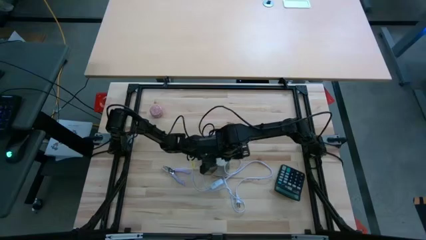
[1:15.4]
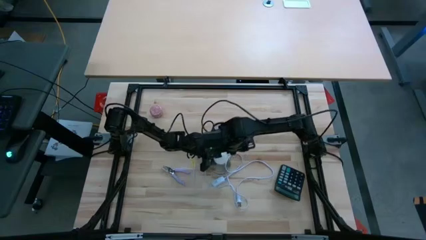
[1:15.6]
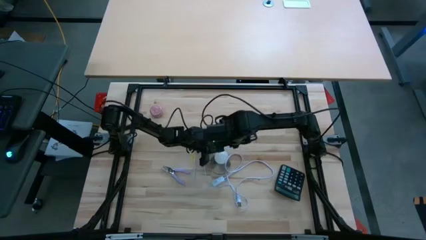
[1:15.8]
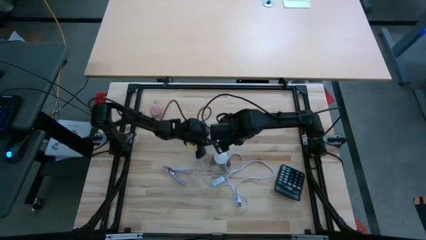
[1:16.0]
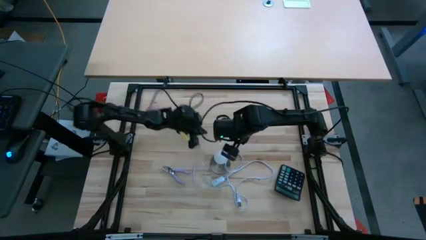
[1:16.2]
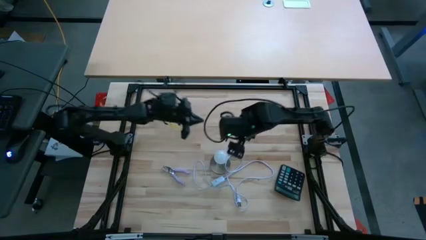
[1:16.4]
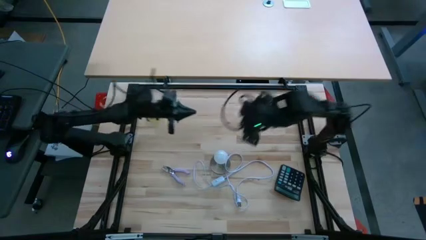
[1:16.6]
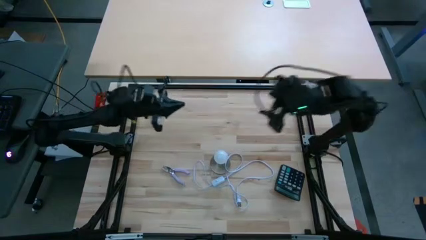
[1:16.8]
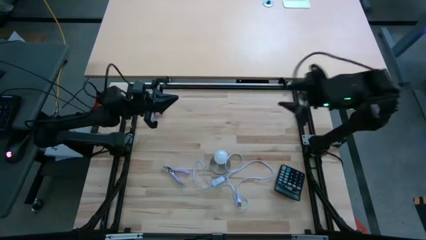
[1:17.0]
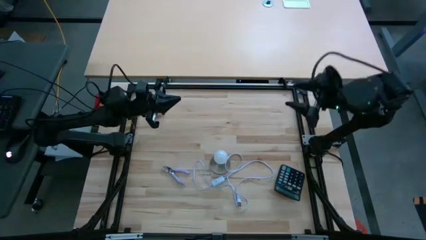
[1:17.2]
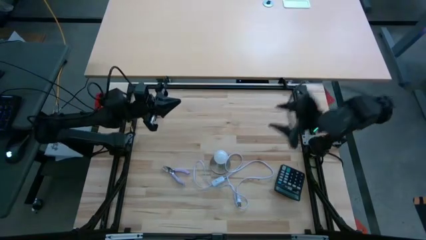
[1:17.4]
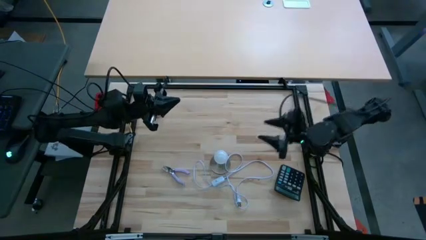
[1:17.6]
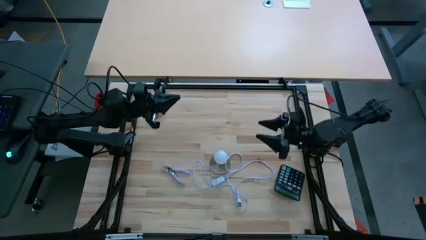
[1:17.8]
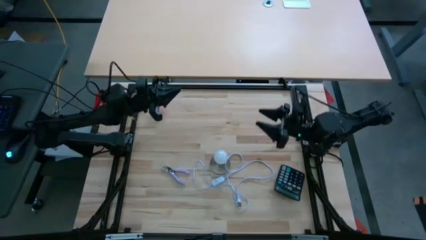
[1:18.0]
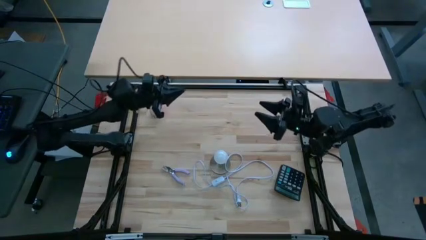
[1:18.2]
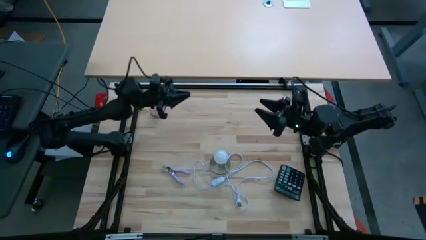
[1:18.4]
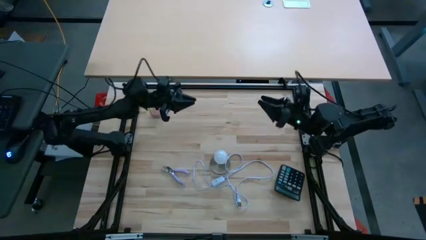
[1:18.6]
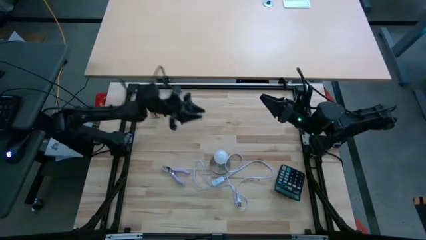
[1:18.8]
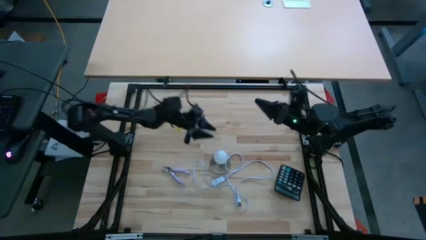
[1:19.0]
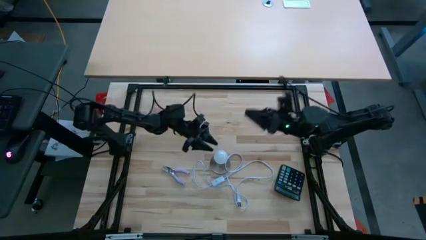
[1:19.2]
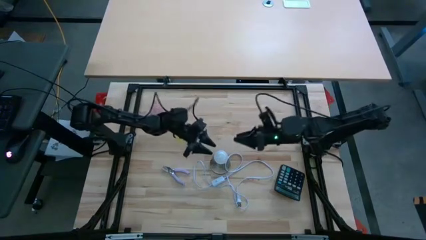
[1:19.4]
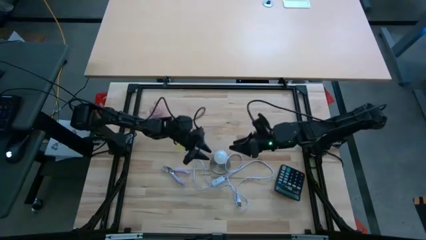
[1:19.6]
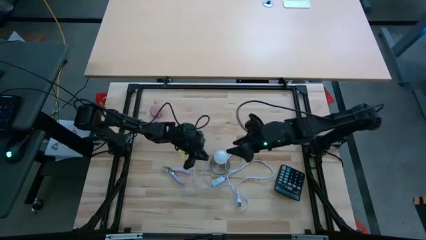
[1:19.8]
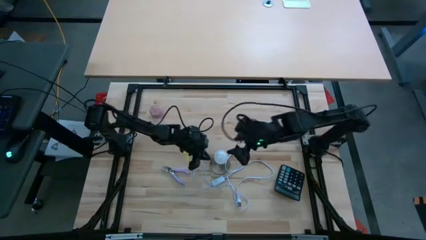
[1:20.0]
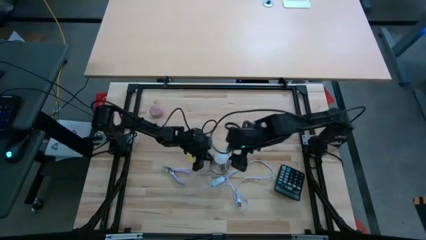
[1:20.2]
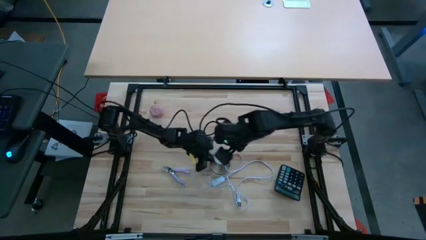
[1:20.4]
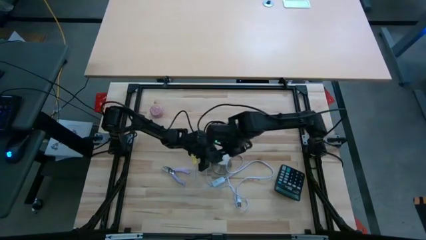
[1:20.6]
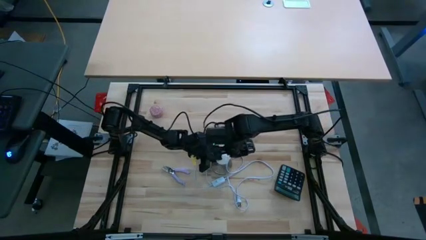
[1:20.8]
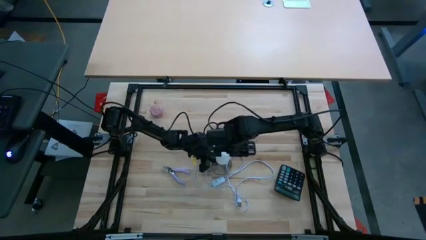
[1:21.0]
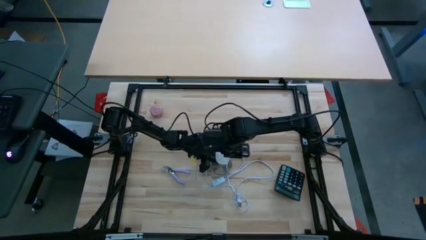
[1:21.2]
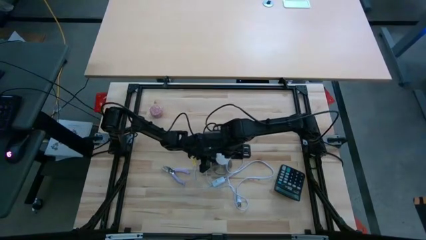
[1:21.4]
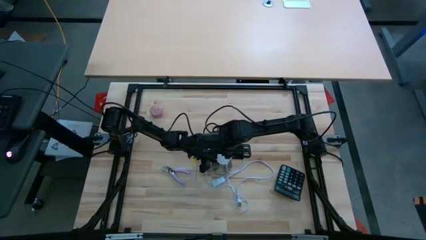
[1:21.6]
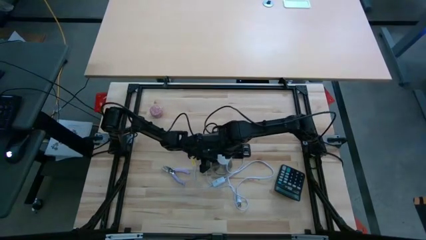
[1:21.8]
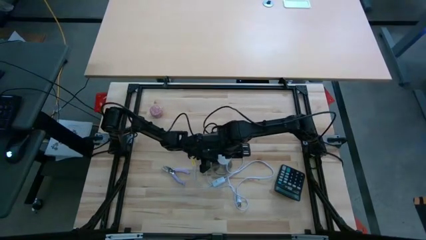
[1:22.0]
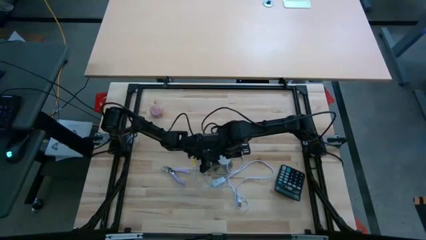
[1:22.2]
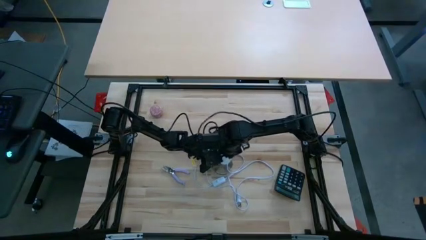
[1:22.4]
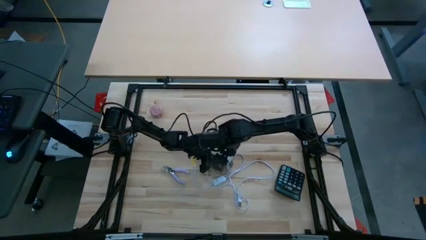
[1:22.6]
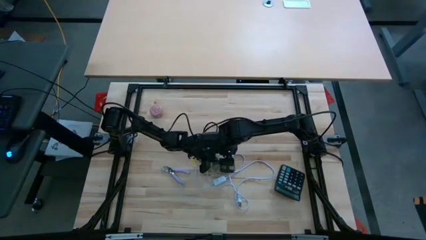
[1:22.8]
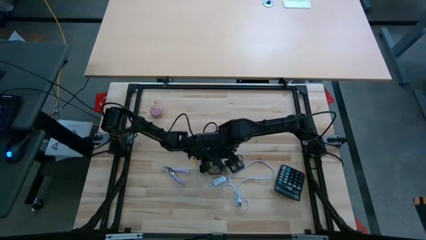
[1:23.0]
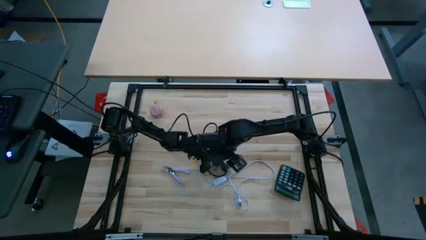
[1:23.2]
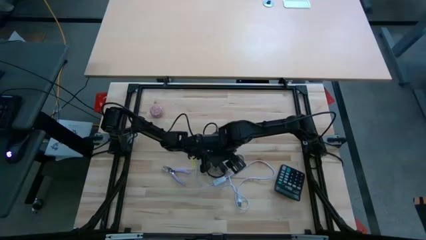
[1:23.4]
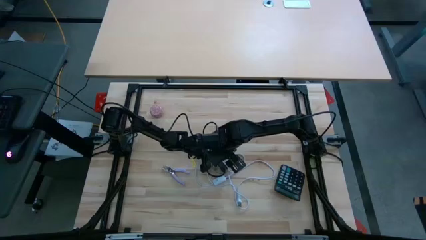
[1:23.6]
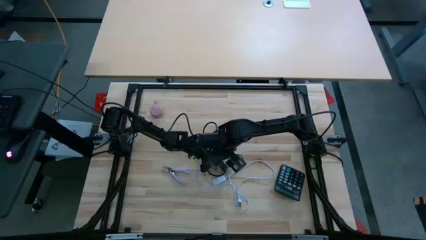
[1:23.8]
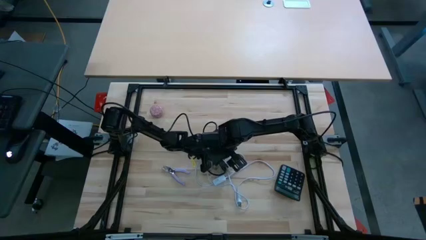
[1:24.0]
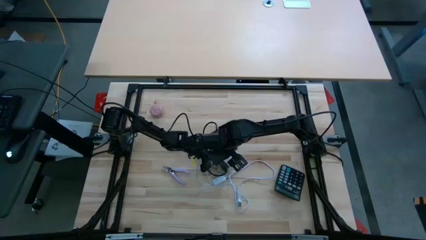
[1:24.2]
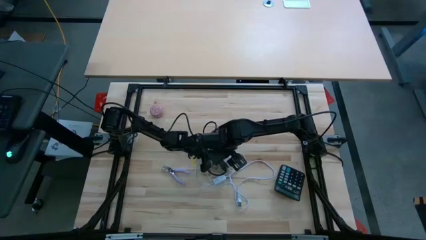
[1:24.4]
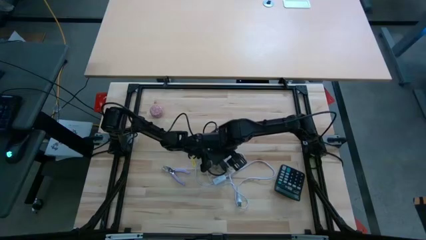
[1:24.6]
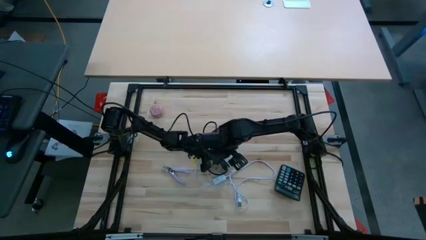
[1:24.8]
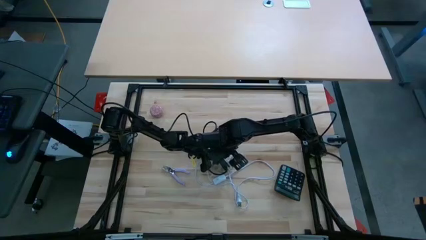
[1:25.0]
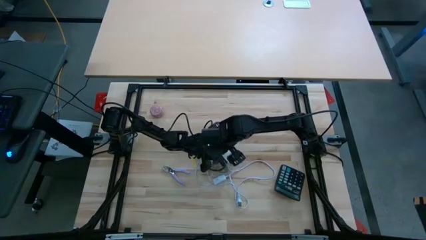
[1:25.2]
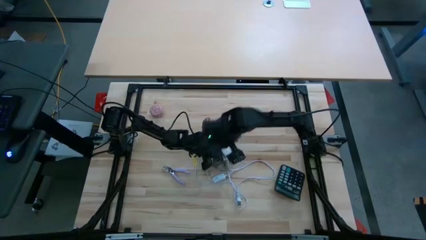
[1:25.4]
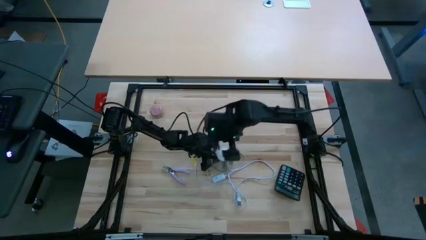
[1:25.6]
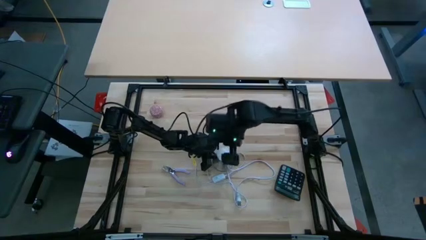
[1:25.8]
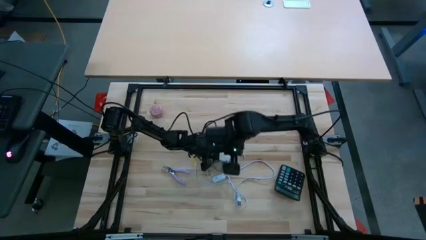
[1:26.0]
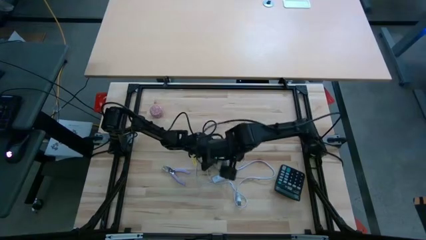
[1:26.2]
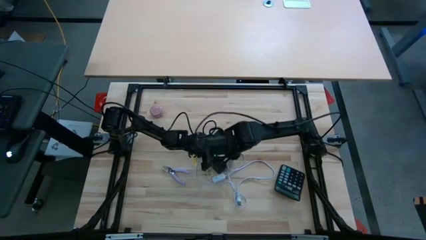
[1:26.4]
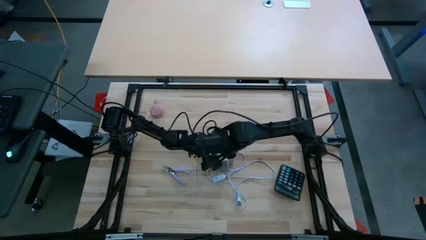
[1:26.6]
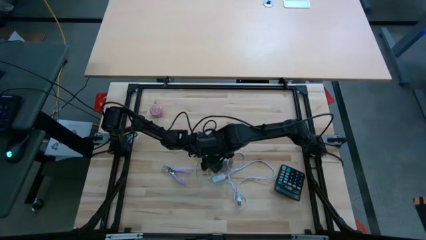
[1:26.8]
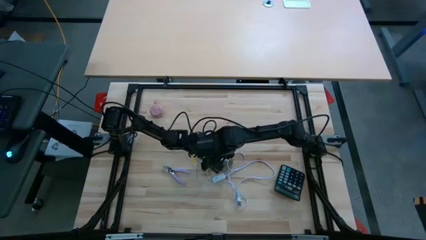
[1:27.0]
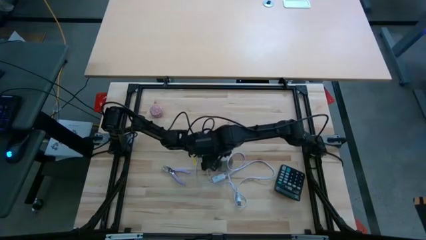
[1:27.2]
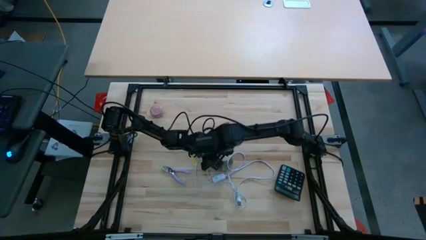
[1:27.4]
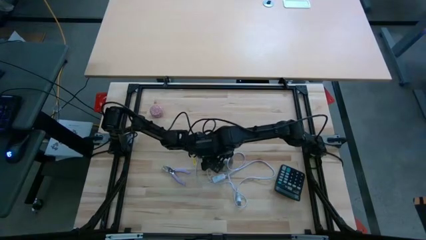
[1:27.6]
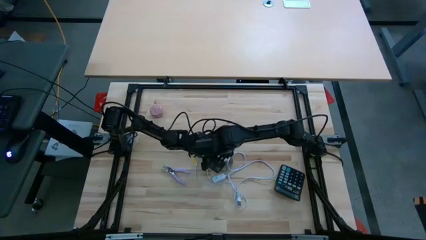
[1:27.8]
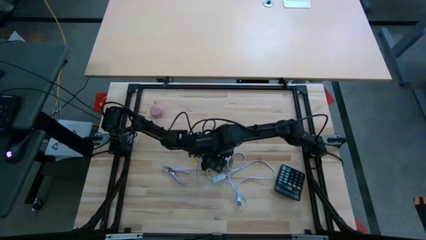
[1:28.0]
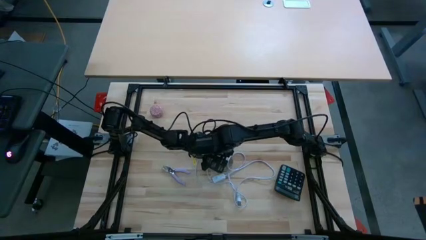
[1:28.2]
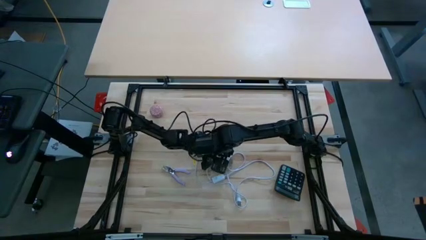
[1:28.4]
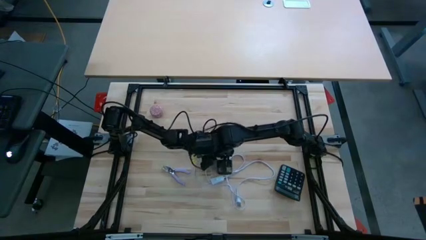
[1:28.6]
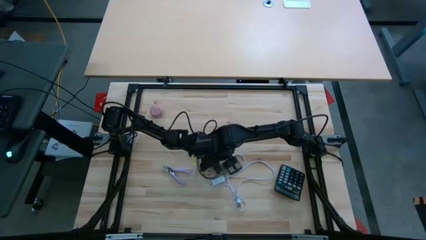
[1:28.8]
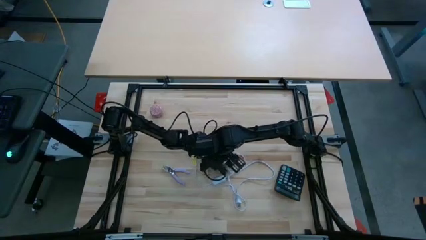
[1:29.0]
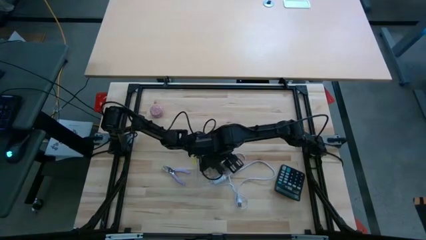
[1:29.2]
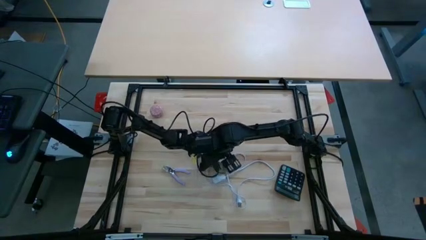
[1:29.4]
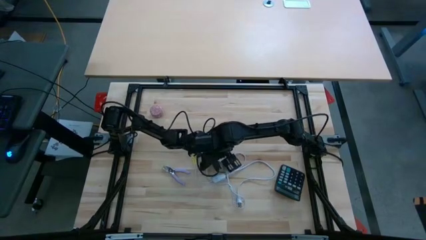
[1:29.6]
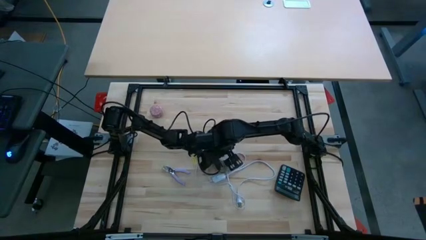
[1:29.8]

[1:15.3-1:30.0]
Task: Screw lightbulb
Remove the lightbulb from the lamp
